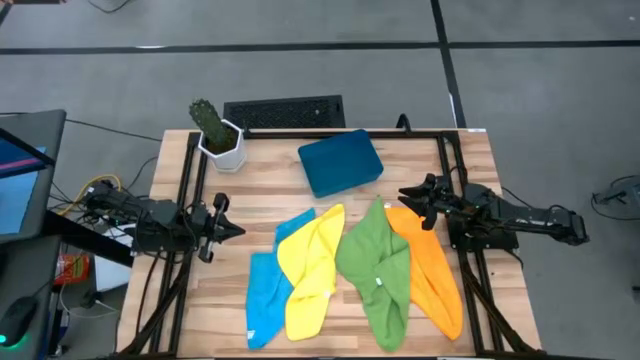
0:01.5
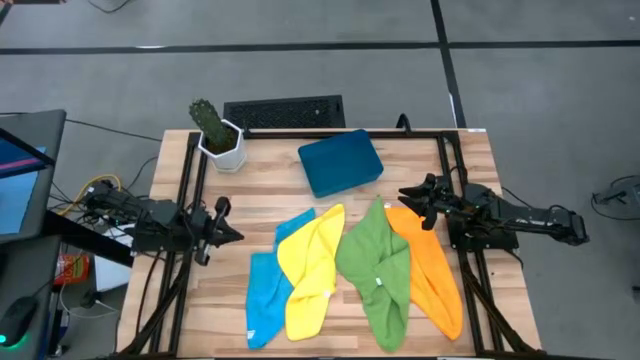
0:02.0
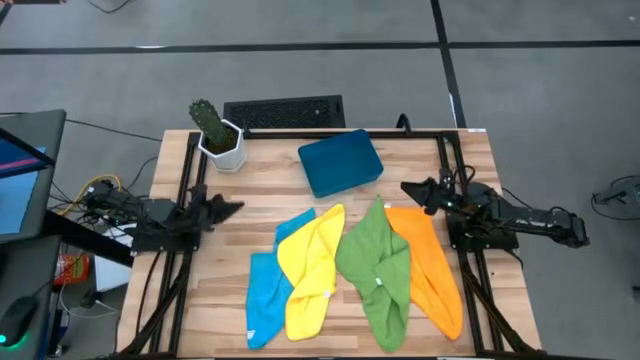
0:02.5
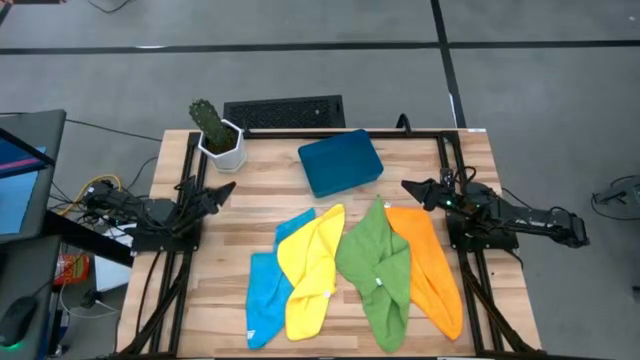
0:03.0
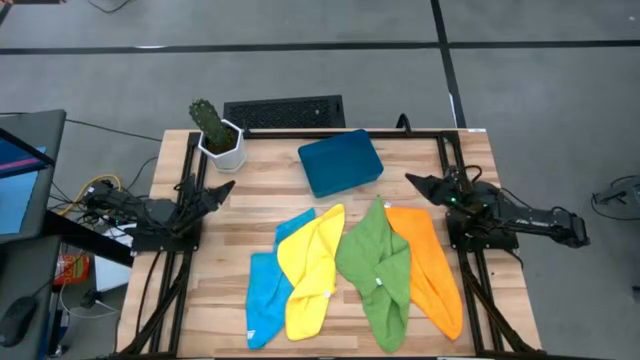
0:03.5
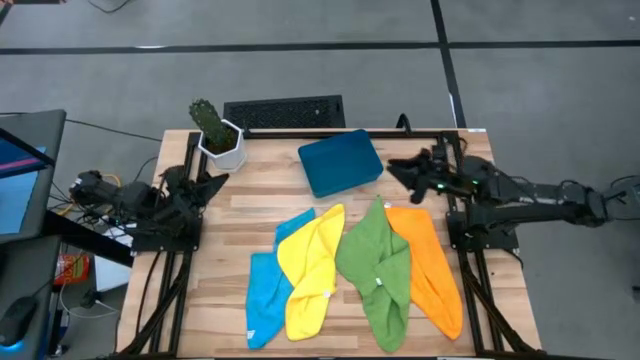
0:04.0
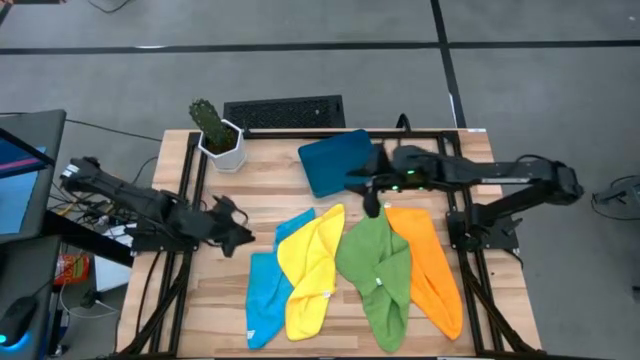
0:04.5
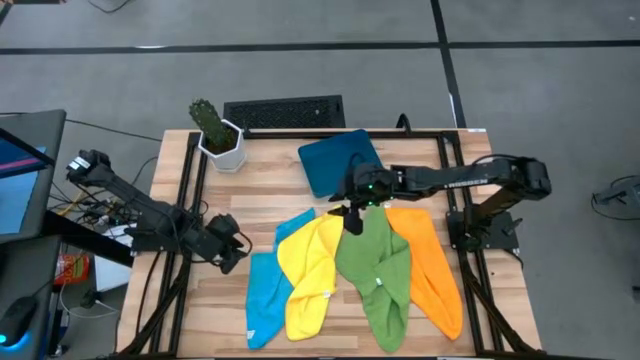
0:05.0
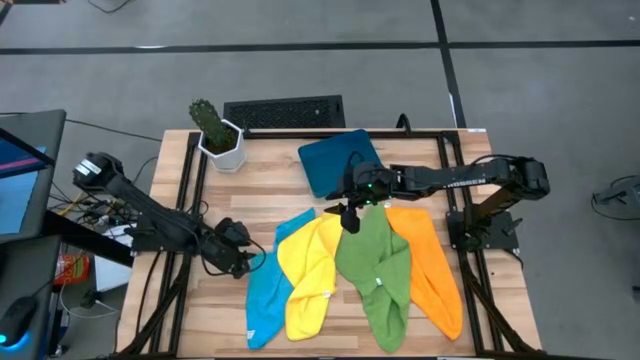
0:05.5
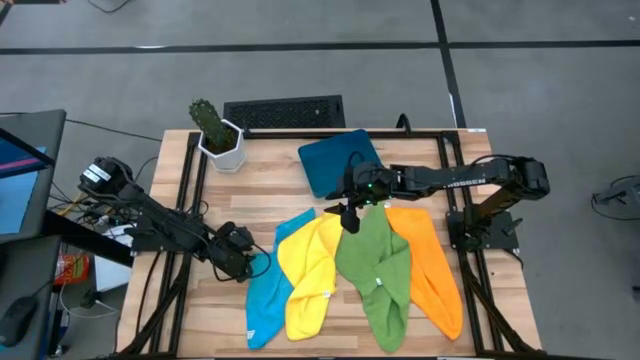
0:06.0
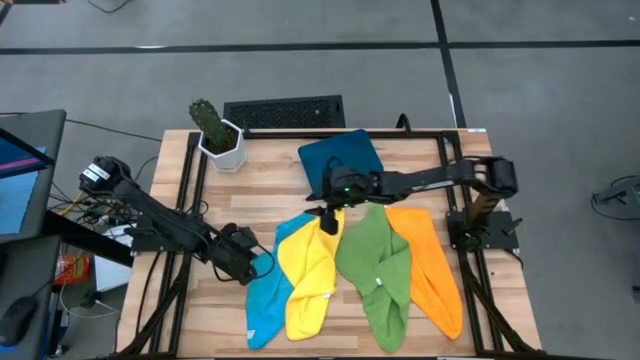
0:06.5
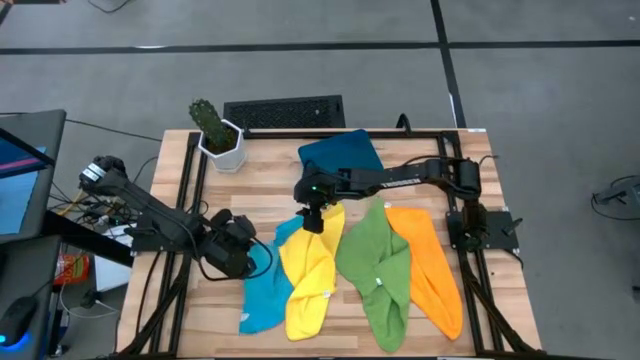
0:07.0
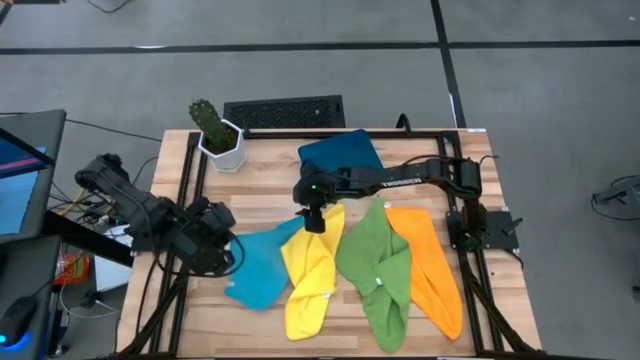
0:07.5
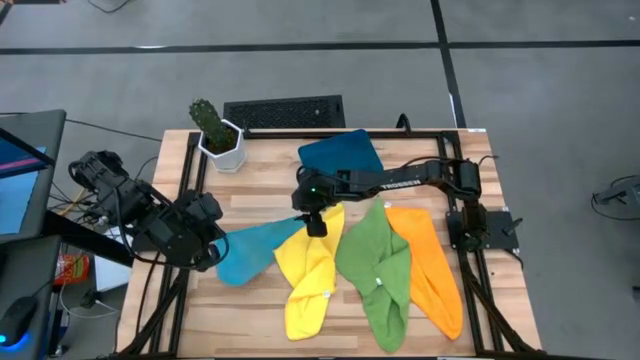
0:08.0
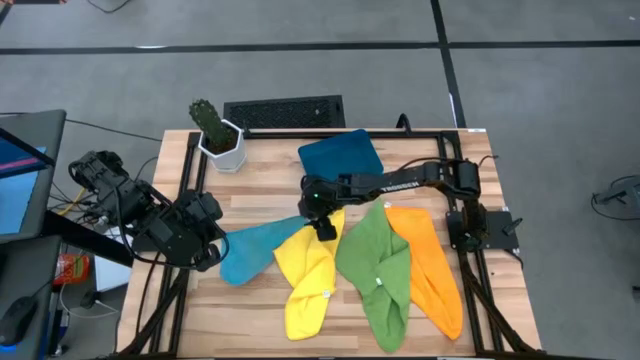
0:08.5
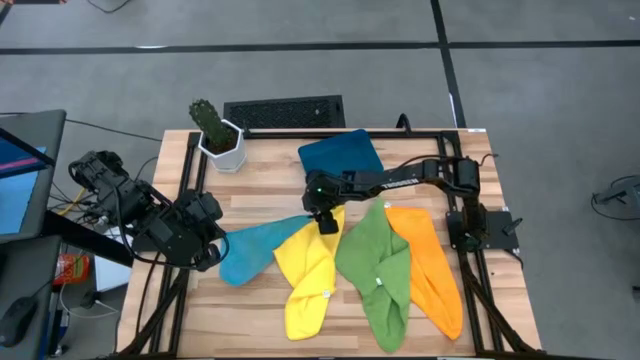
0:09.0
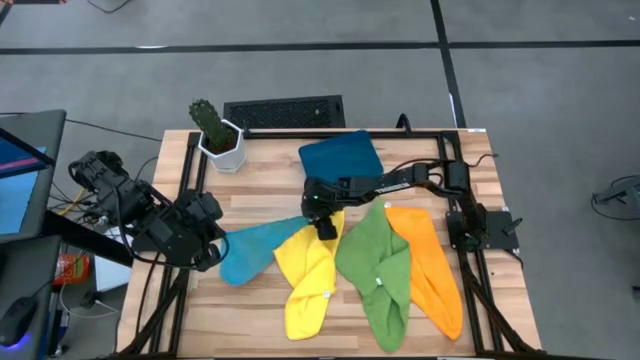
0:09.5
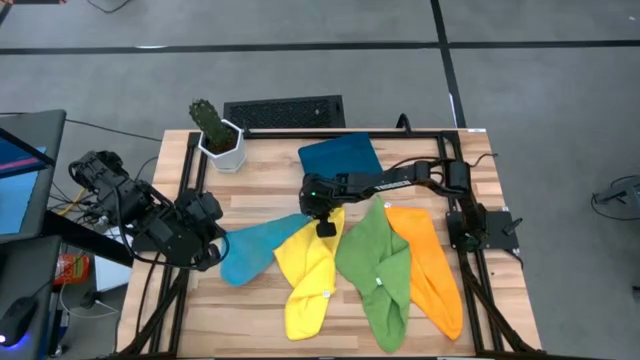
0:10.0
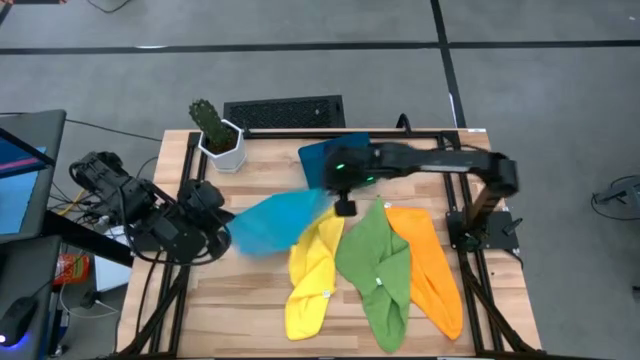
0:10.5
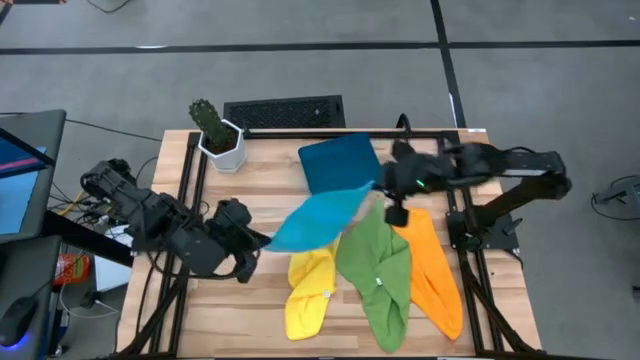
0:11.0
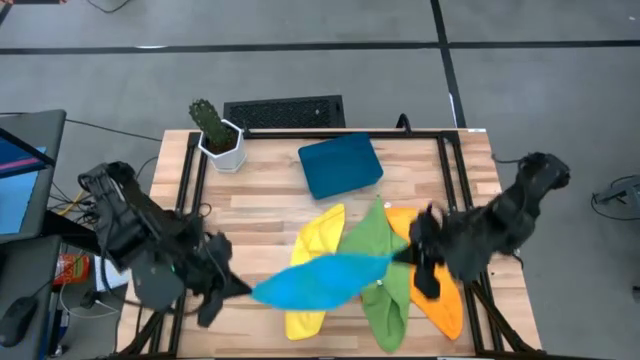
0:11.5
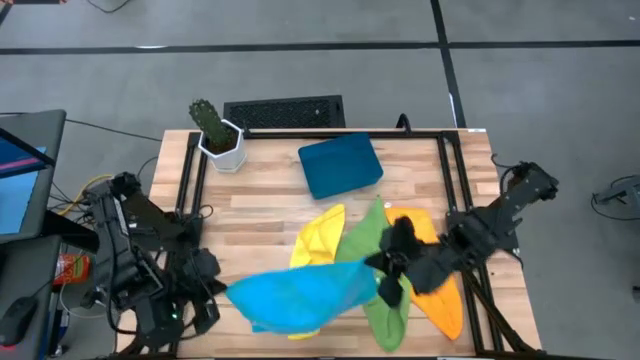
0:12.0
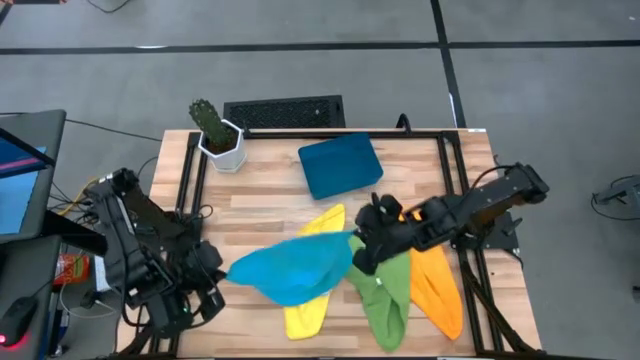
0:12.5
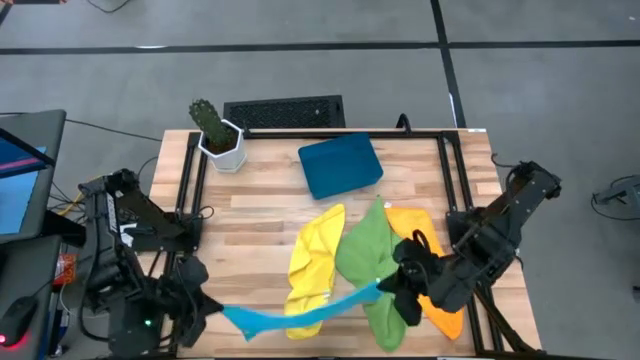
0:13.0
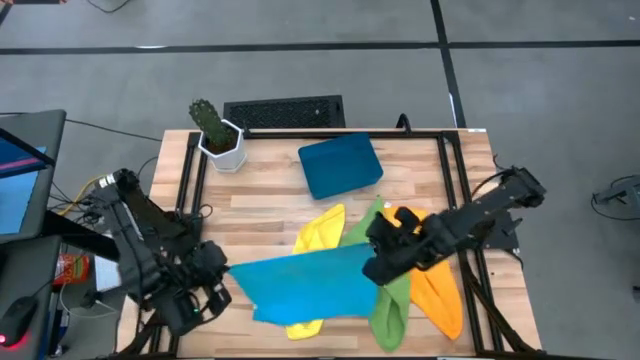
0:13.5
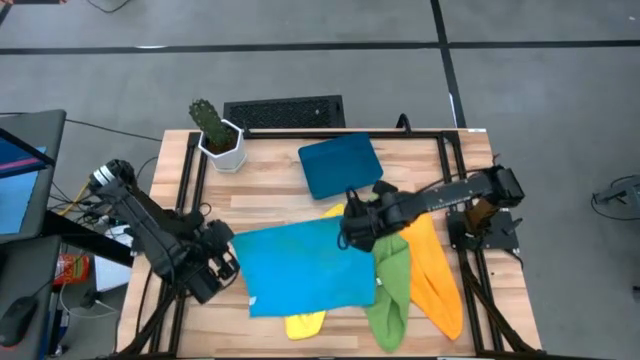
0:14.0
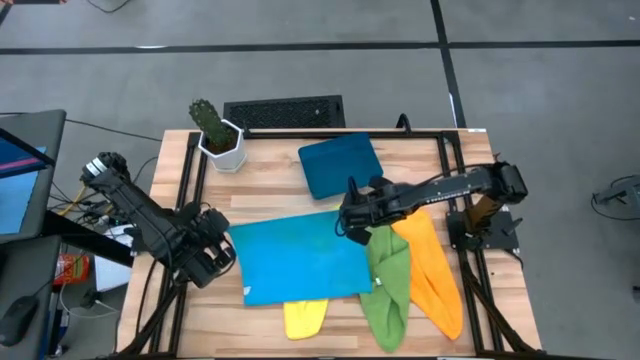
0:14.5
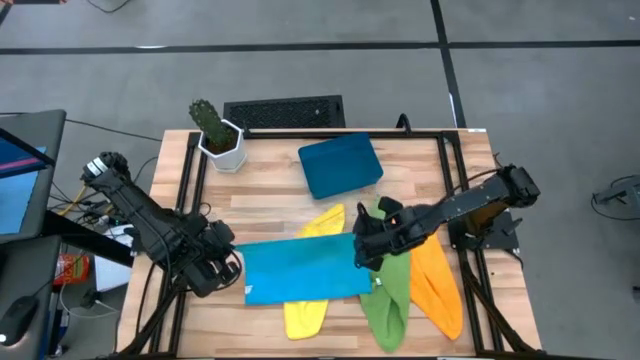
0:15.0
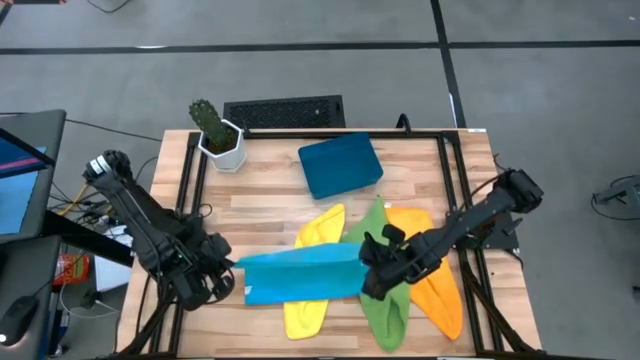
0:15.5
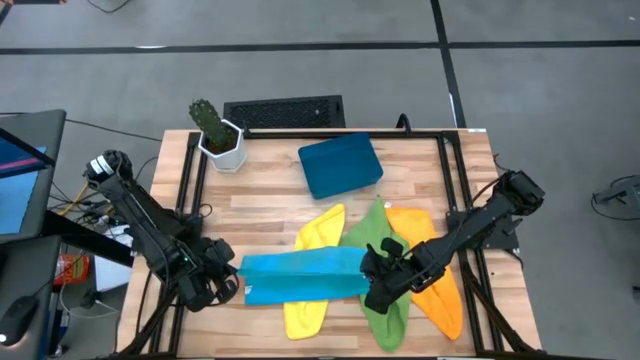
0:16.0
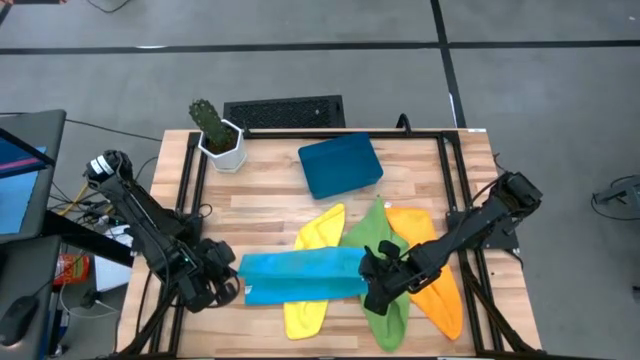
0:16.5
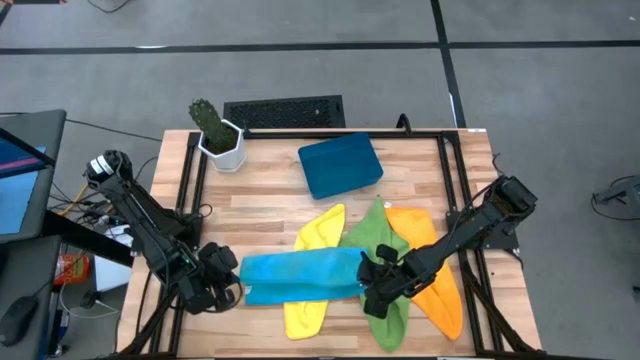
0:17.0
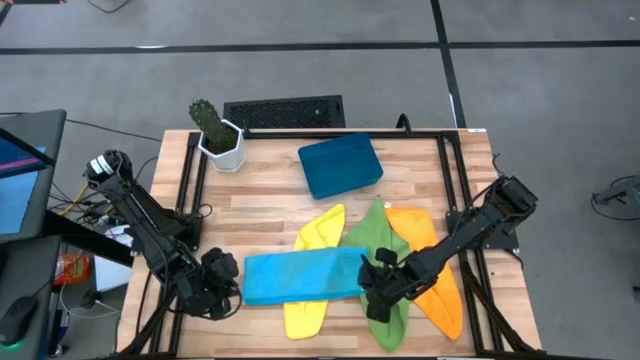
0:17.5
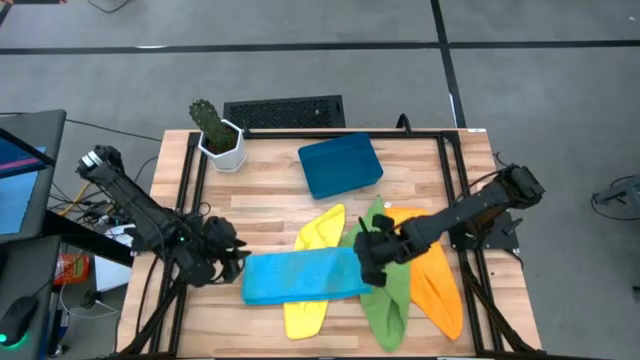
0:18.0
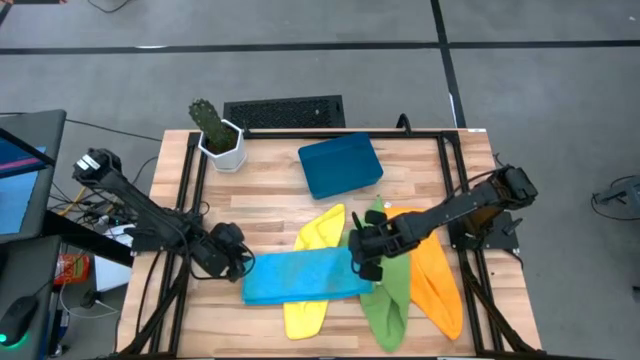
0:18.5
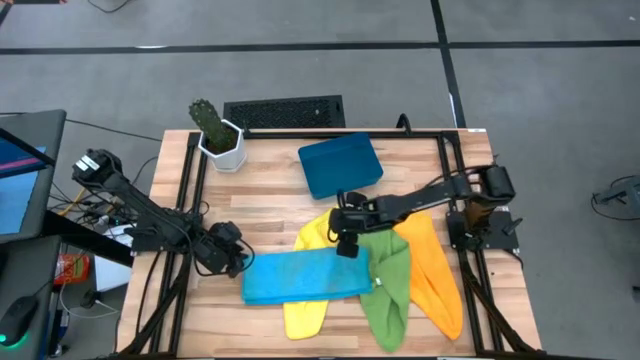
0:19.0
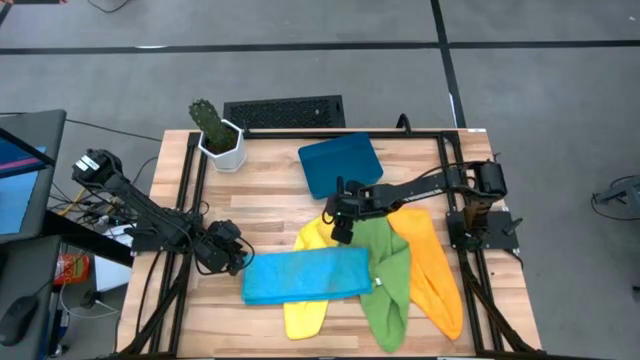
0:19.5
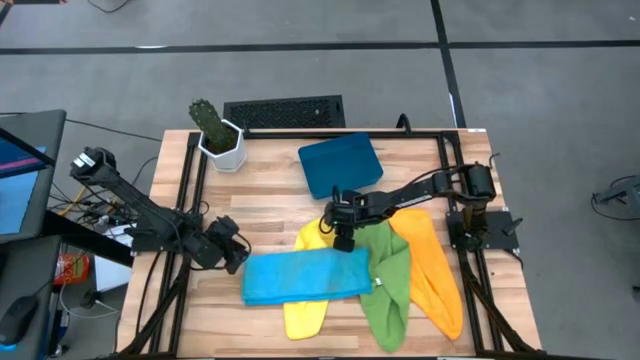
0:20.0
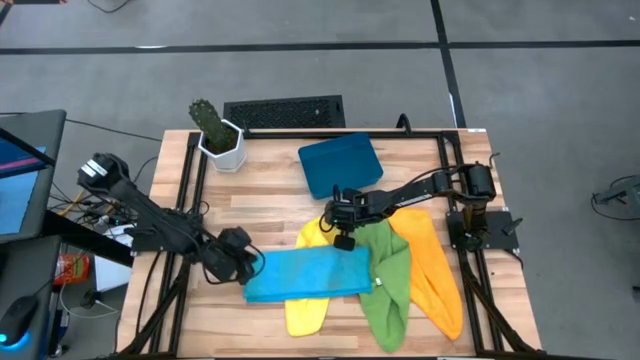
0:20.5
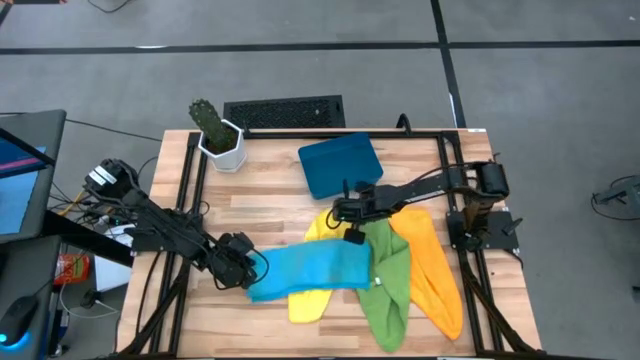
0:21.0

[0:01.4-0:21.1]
Task: Fold microfiber towels
Fold the blue microfiber cloth
